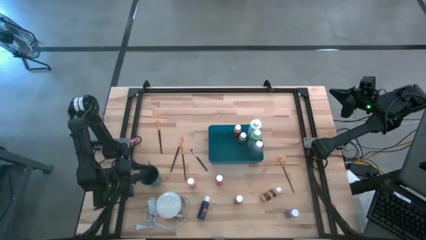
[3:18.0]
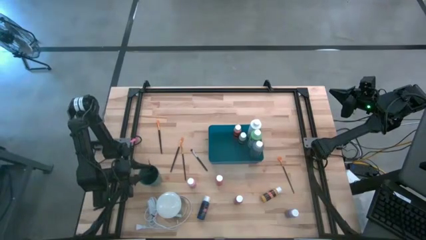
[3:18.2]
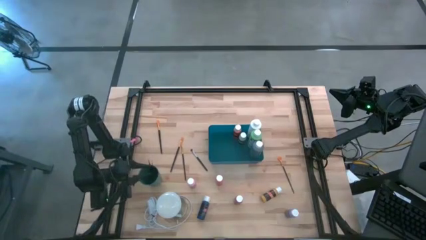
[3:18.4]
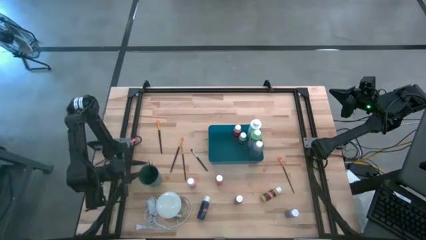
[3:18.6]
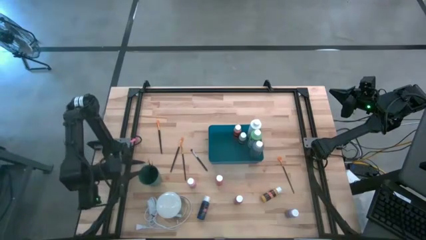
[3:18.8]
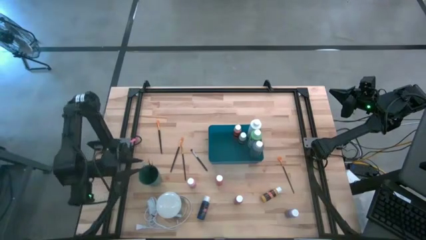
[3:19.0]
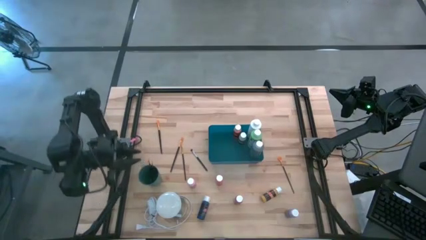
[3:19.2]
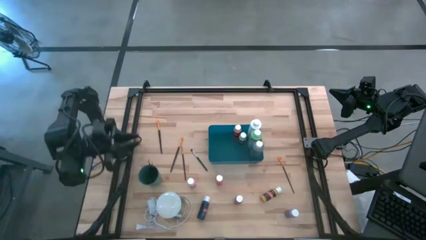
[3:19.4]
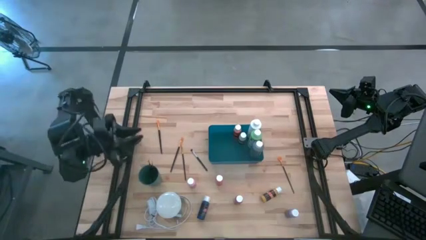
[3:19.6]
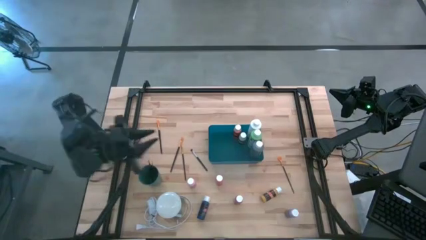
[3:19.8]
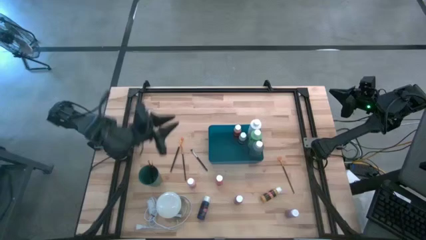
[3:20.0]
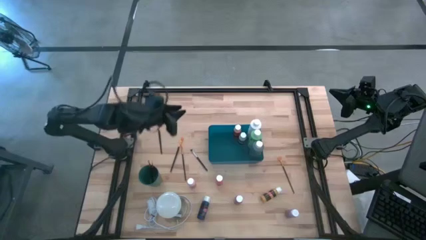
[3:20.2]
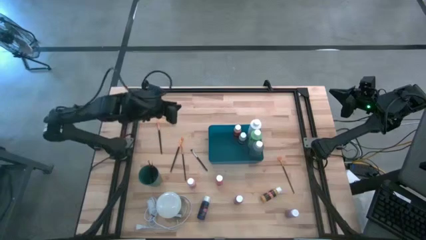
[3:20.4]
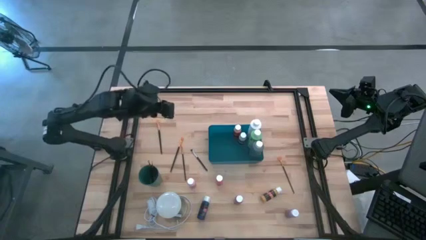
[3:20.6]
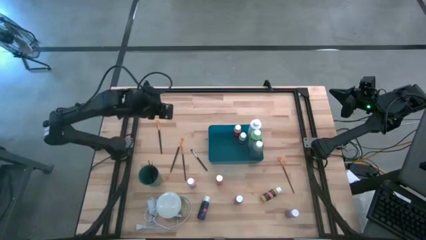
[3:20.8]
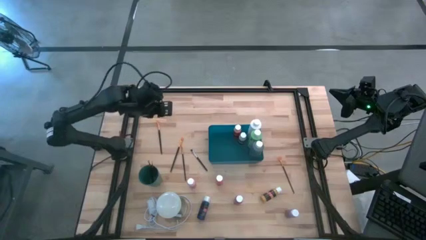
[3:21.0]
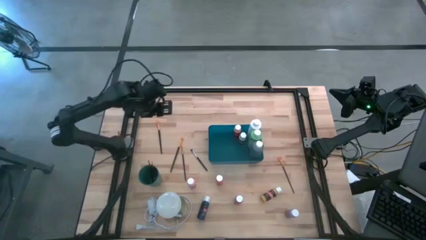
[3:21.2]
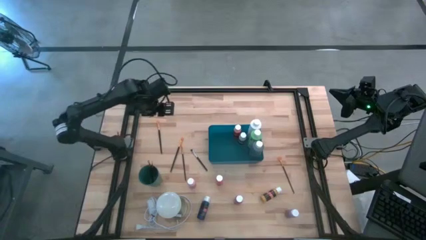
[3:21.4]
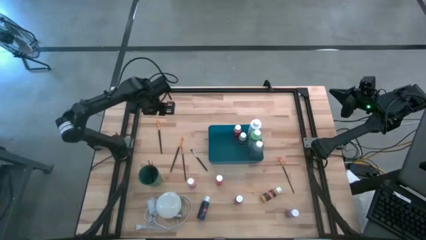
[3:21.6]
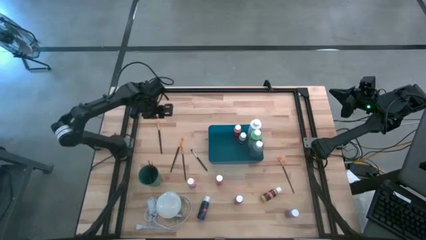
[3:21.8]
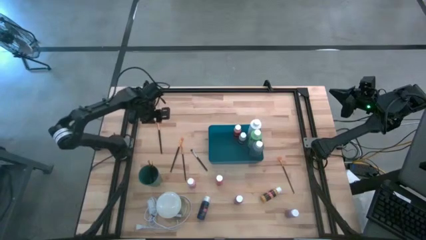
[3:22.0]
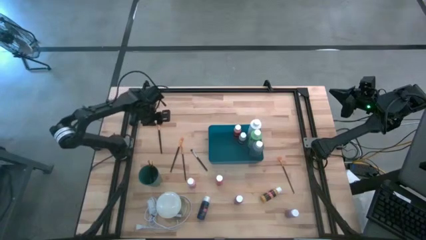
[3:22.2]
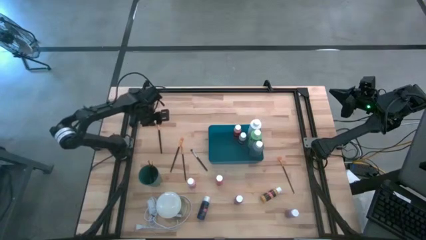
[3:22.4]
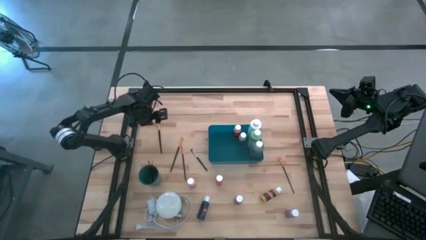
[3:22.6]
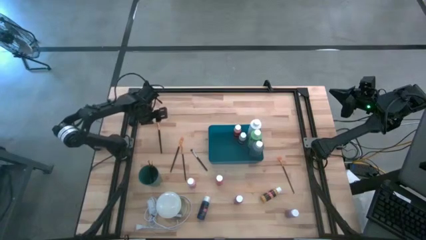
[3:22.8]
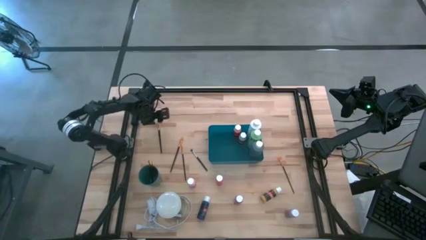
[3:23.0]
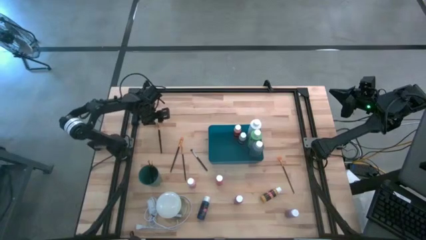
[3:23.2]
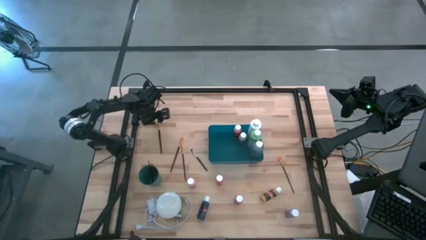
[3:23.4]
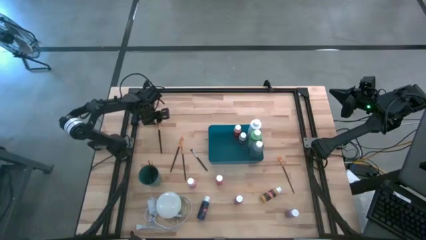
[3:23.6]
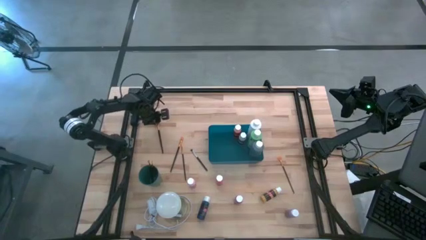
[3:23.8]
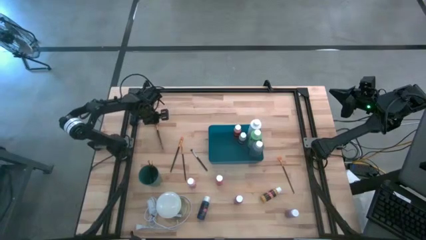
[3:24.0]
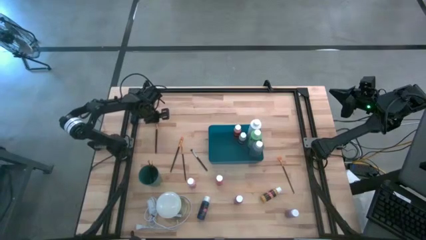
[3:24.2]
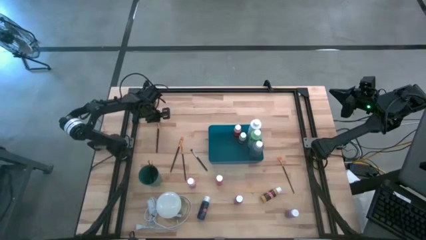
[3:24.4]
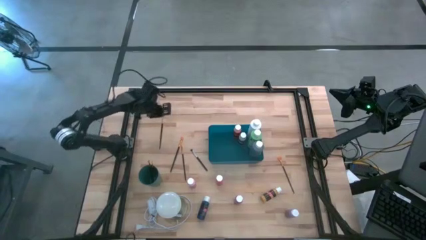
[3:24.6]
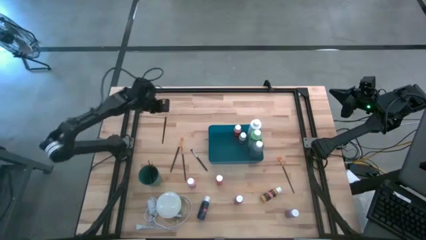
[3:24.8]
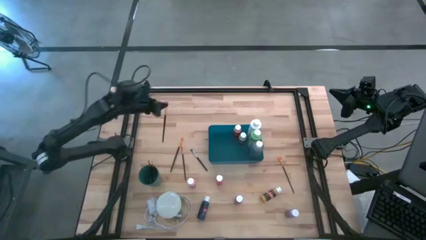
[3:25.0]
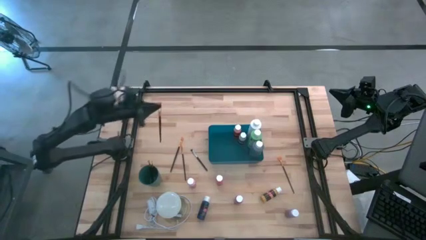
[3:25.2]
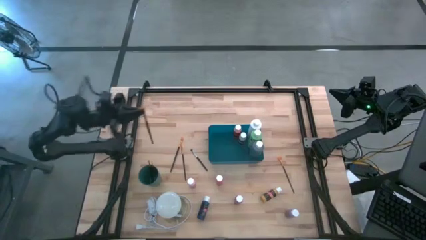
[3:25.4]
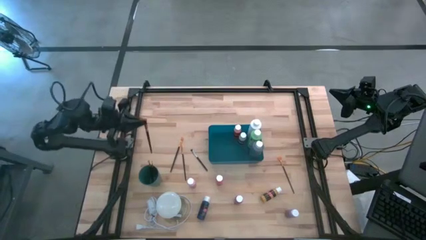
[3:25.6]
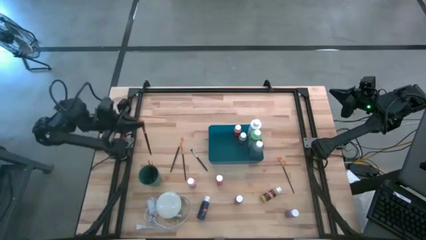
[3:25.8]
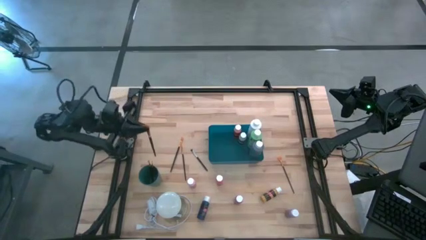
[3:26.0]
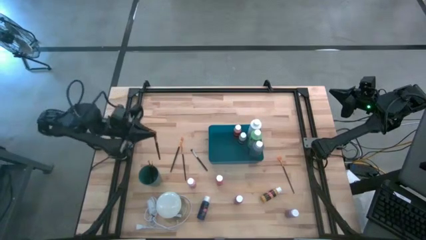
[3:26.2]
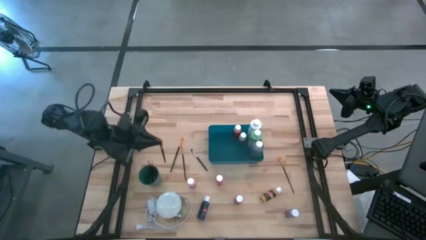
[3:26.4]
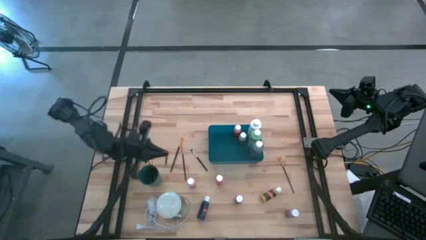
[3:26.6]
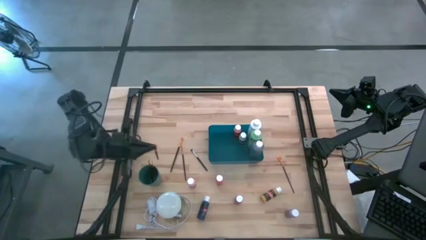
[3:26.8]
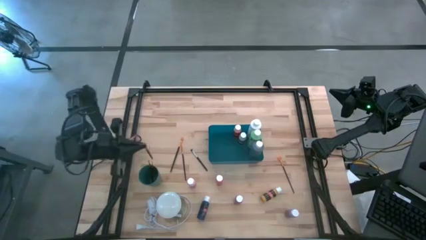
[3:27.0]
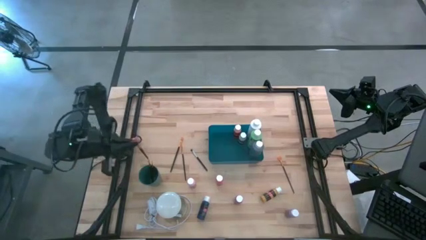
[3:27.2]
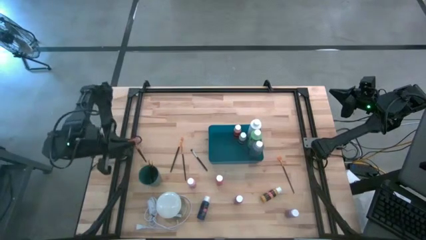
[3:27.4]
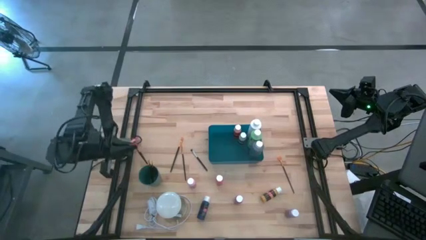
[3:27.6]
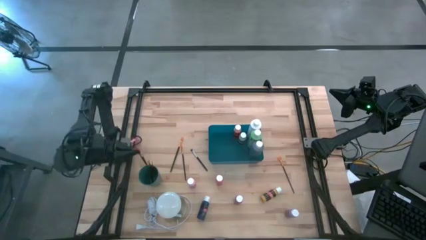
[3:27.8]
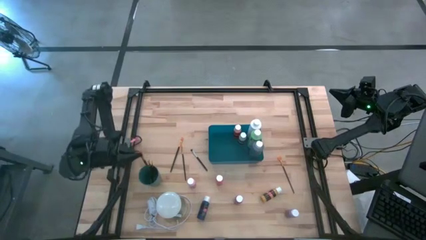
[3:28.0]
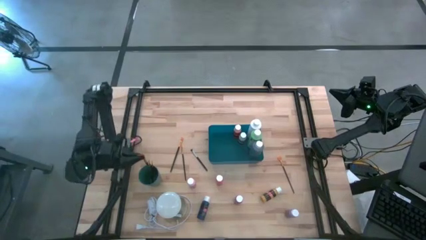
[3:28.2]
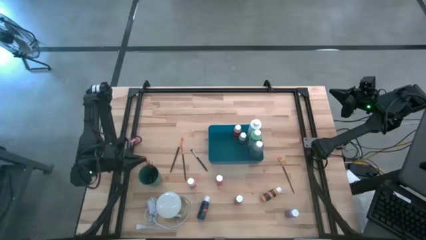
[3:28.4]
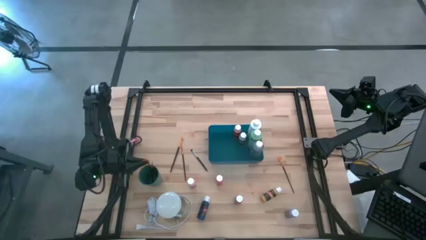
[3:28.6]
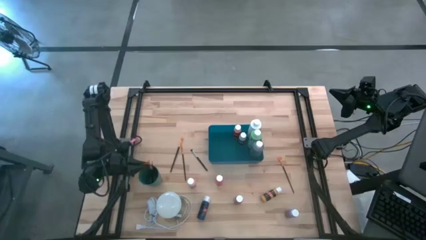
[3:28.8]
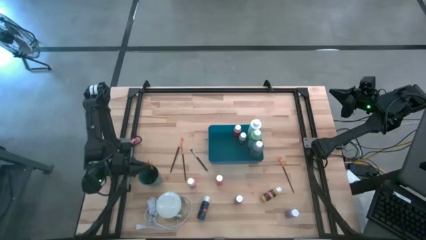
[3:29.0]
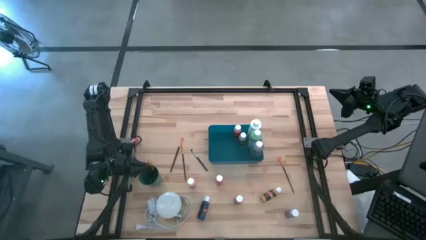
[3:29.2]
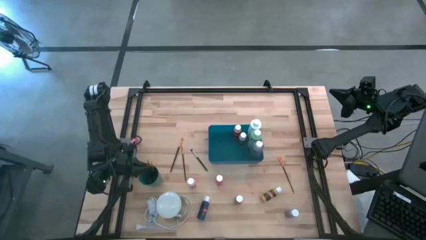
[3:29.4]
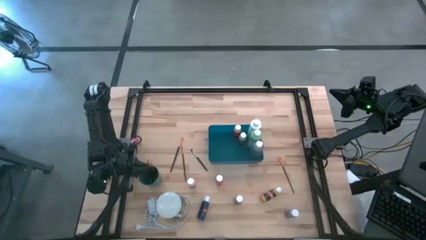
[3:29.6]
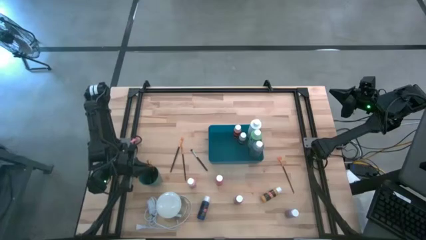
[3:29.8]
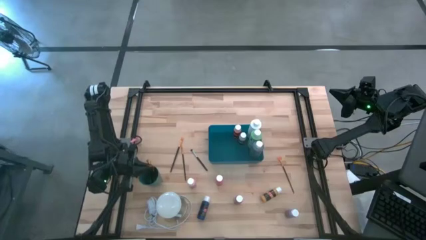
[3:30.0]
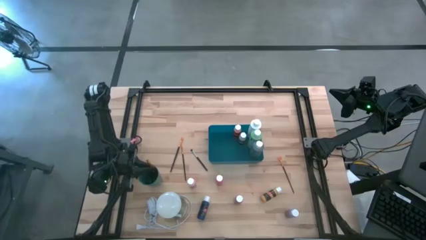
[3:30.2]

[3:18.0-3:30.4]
Task: Pick & Place Paint Supplies
Put the gold paintbrush into the green cup

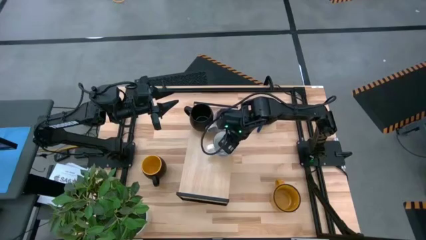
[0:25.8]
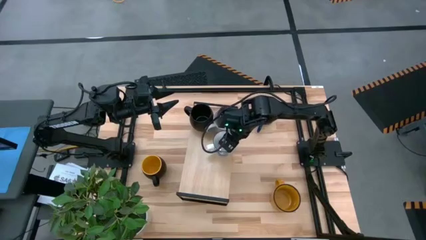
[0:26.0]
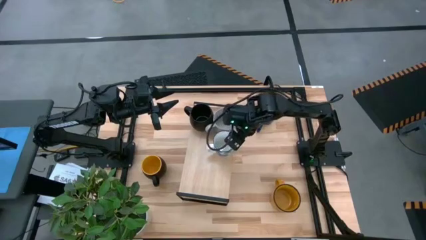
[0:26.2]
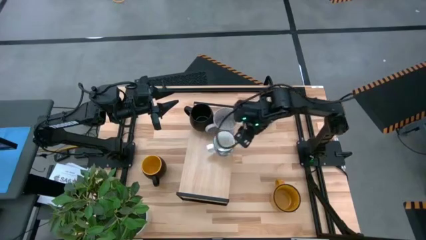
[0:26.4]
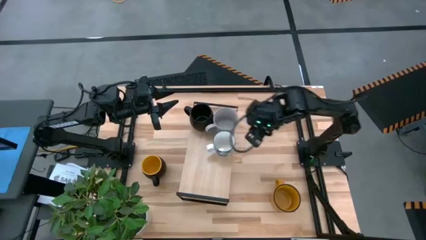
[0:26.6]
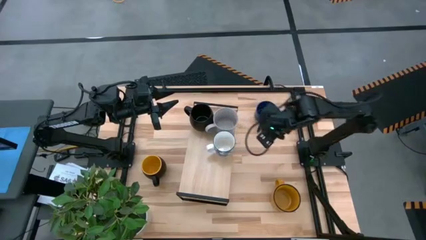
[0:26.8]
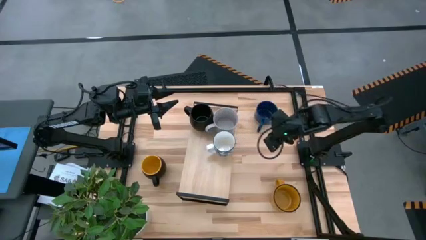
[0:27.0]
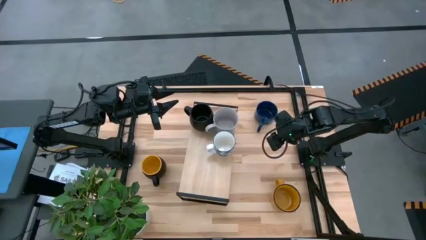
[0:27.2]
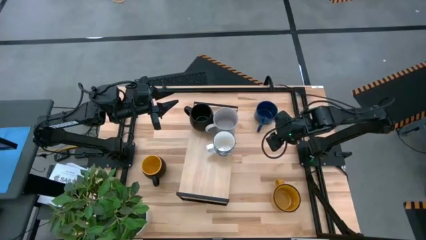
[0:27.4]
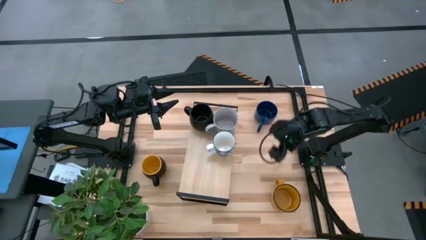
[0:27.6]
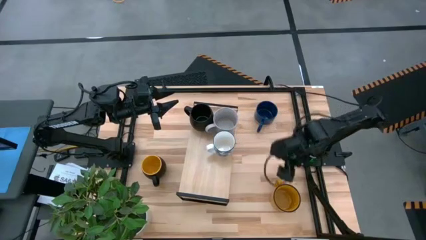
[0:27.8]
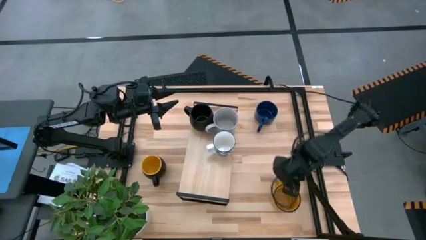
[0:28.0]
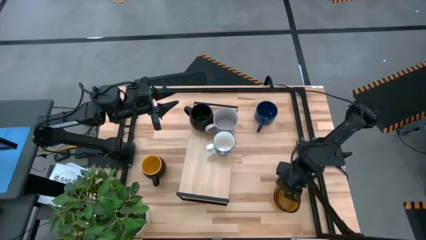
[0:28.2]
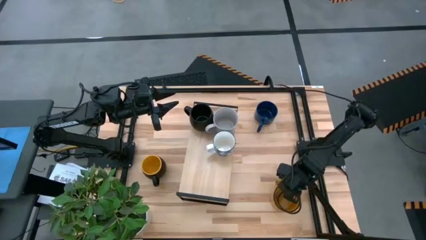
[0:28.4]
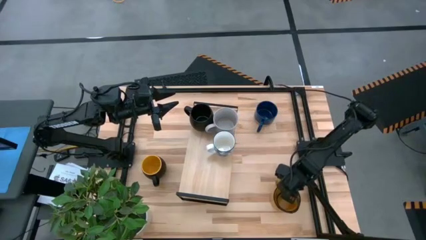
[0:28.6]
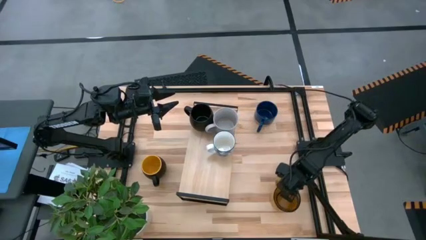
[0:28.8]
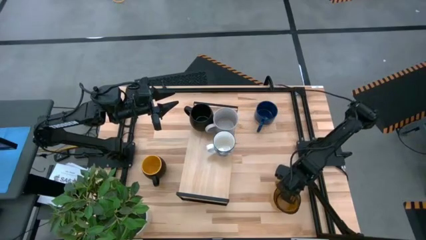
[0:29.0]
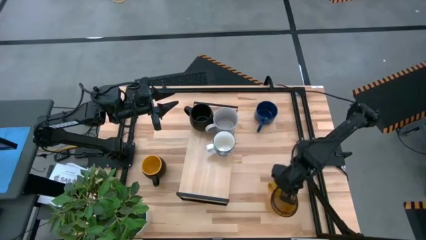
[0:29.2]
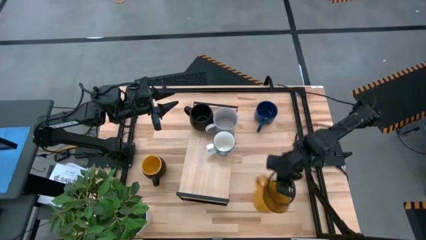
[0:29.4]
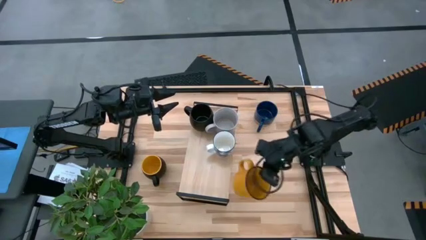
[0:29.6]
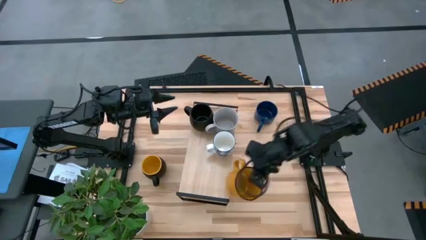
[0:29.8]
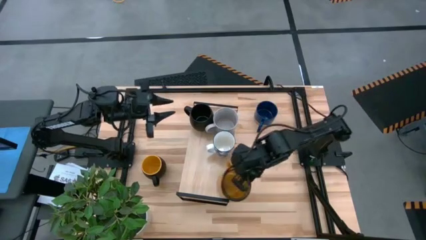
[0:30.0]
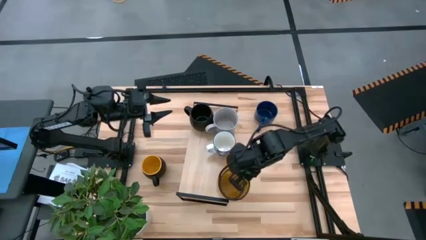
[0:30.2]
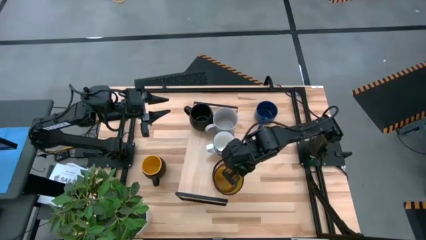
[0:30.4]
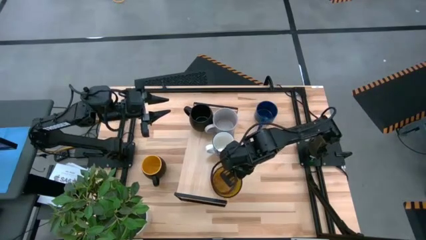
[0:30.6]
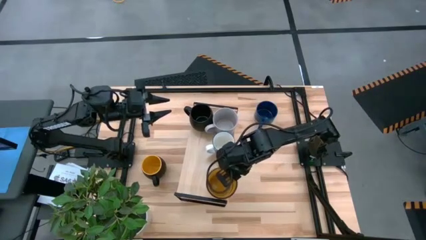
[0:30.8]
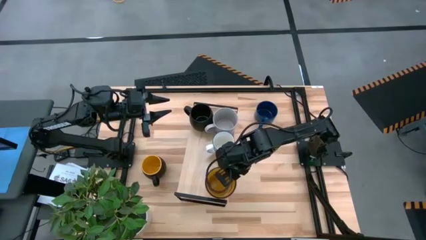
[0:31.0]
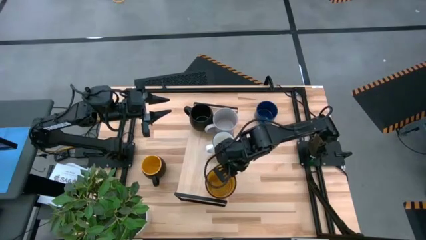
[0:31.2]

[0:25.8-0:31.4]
Task: Place coffee mugs
Put the yellow-black mug on the shelf
